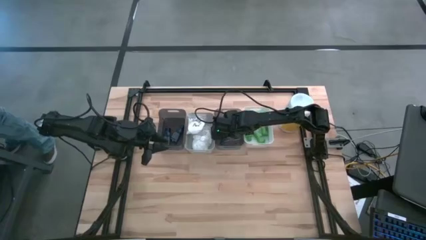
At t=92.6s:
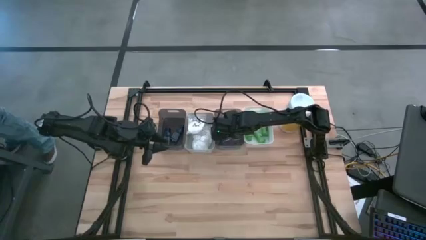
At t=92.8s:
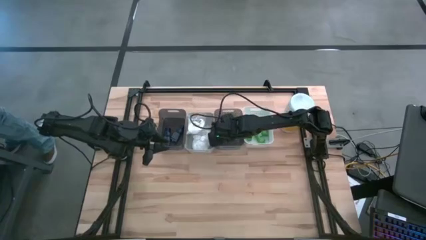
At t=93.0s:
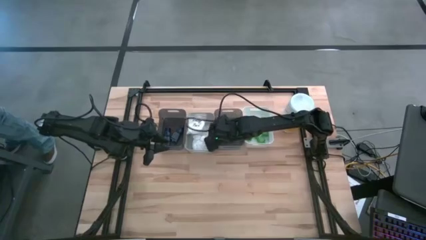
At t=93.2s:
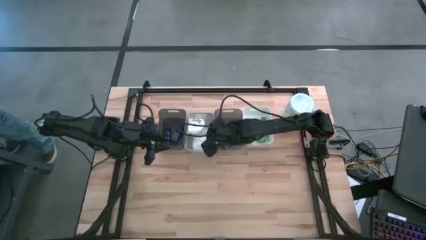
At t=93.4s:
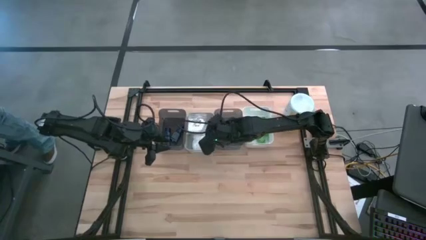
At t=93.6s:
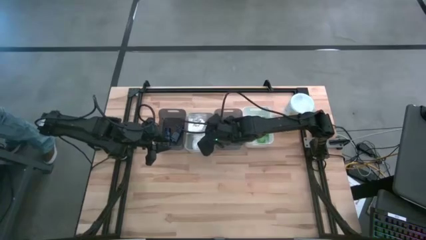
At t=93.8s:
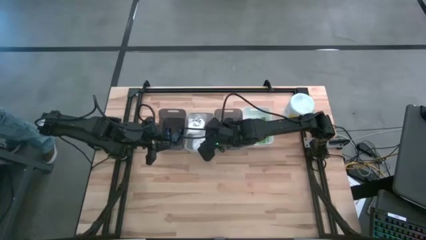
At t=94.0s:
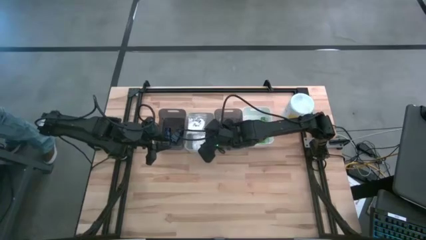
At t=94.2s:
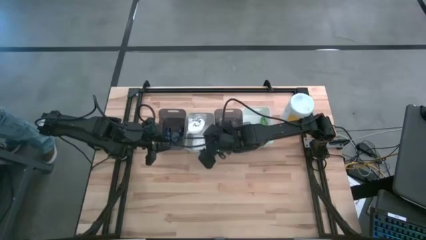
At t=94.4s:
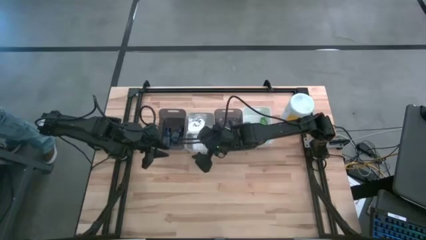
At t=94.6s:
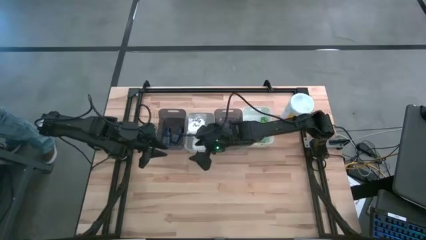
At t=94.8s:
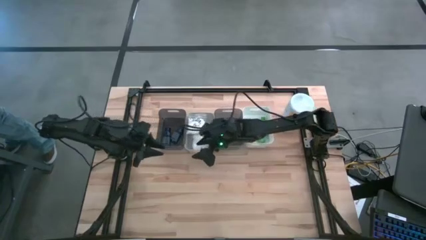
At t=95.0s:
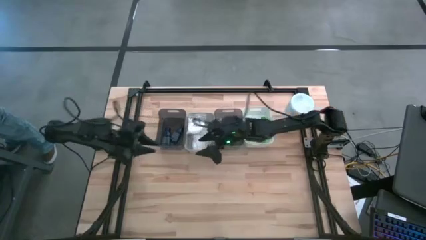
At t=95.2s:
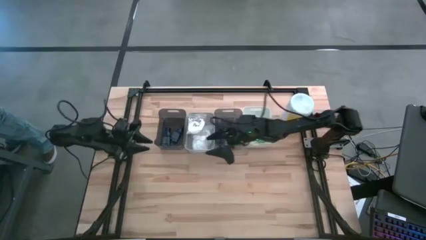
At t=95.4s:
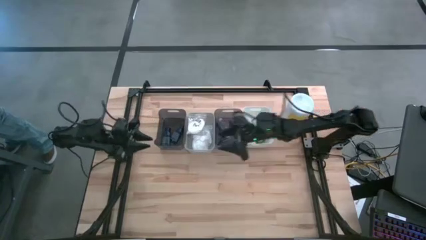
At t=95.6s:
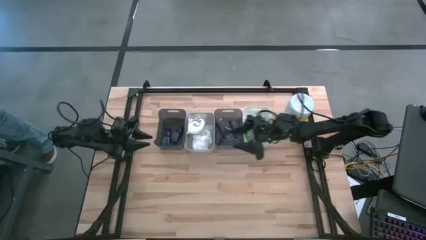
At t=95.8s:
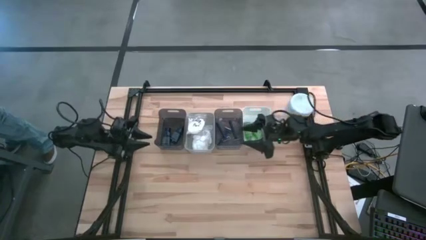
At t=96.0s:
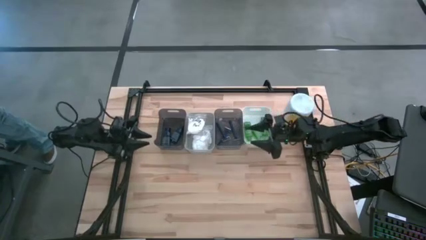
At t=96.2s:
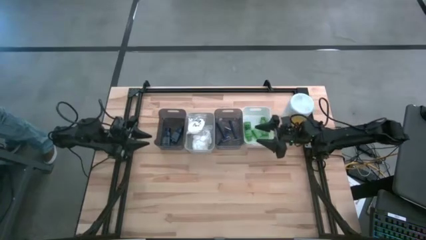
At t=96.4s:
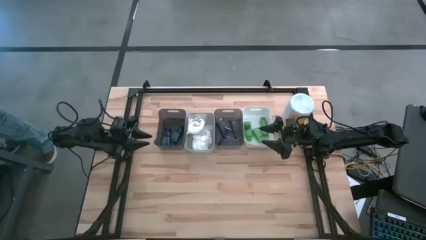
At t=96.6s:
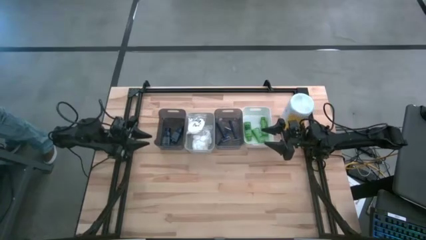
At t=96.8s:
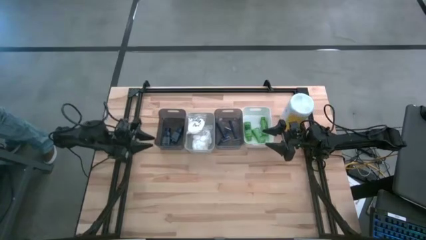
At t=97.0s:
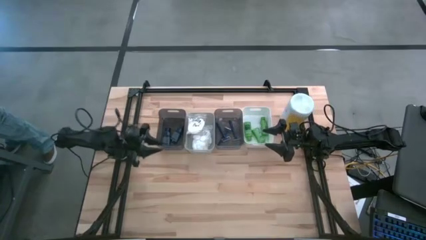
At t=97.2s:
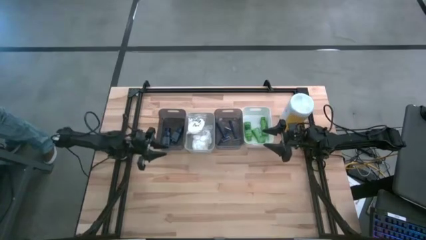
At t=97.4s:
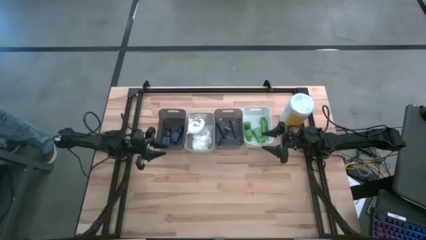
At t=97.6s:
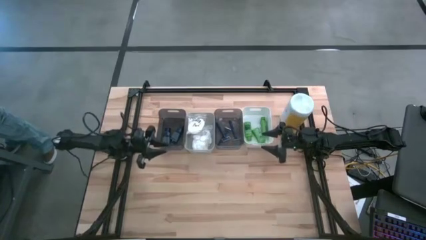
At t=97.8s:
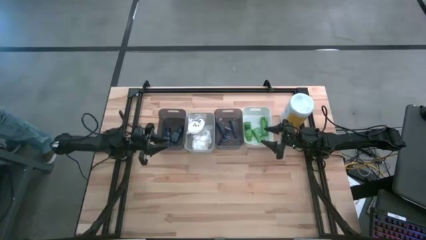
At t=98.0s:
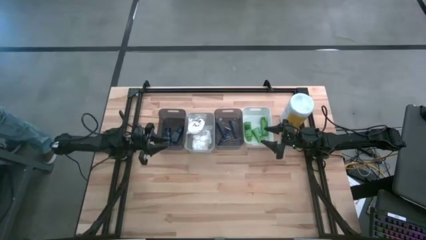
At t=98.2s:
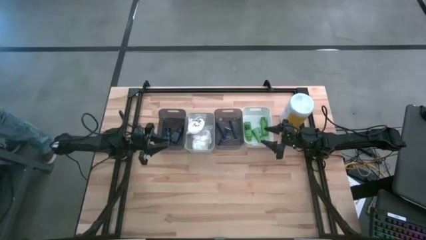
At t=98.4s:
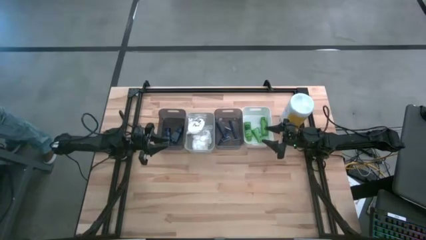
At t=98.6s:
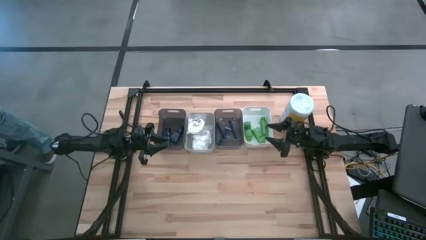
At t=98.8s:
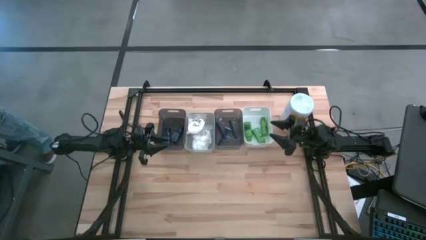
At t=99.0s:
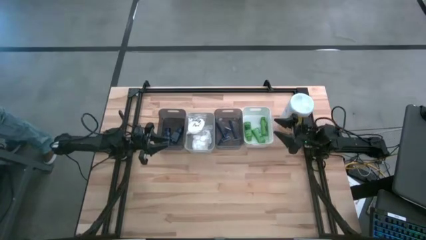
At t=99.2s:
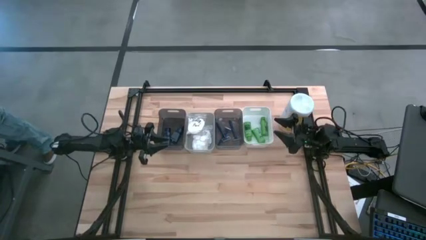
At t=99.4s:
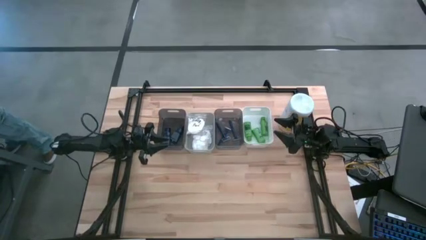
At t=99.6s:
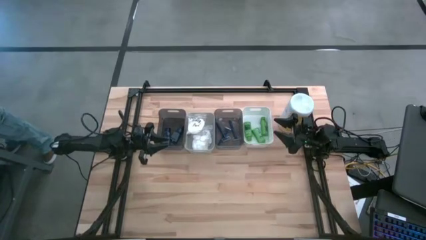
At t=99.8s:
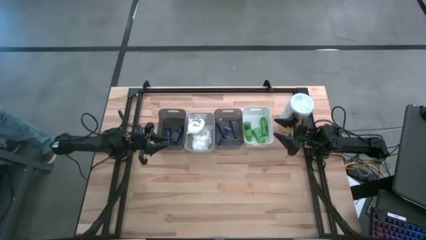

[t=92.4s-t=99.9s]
Task: Pick & Place Travel size toiletries
Return to Home Position

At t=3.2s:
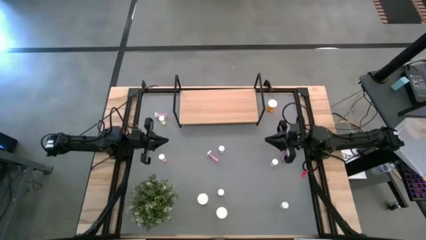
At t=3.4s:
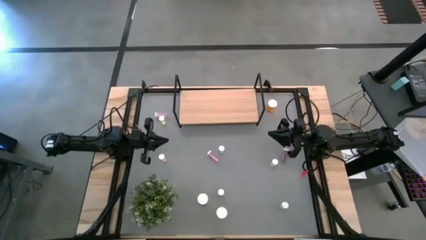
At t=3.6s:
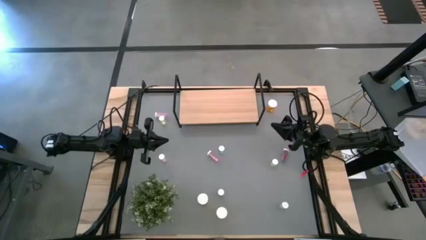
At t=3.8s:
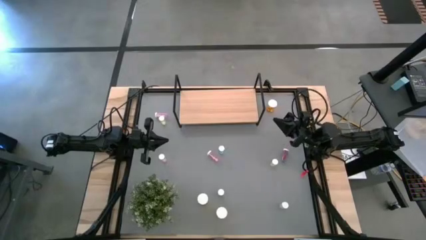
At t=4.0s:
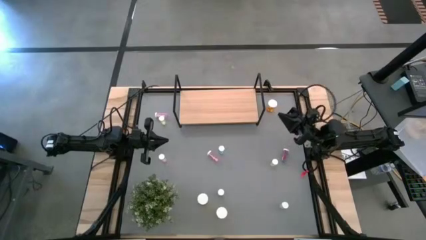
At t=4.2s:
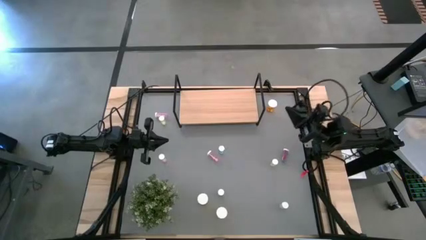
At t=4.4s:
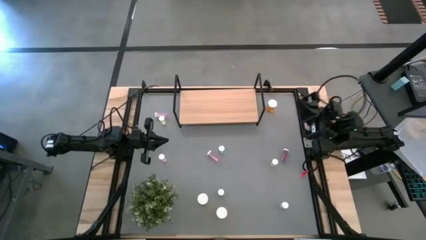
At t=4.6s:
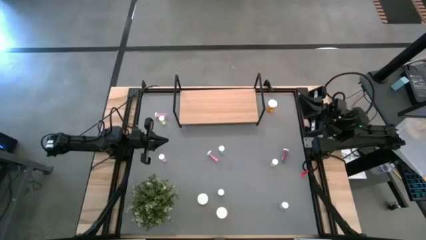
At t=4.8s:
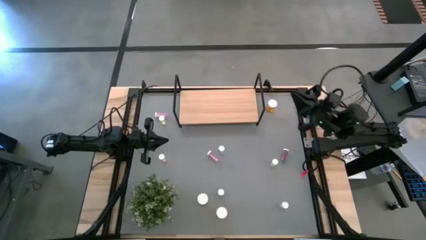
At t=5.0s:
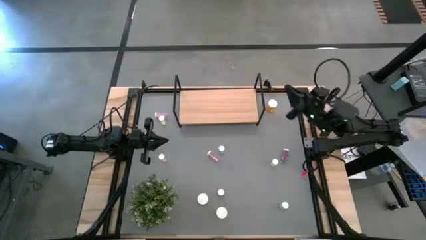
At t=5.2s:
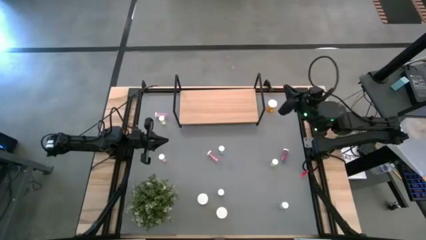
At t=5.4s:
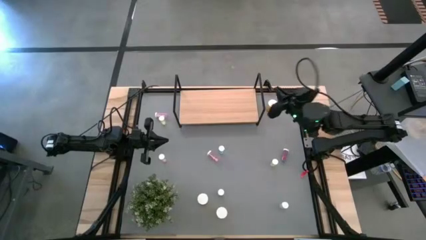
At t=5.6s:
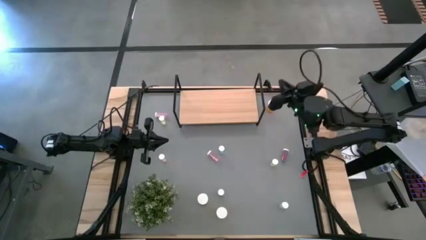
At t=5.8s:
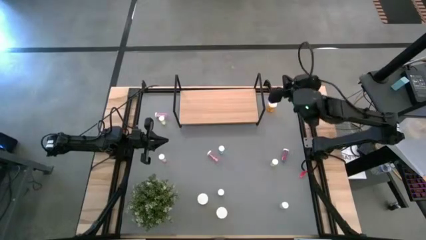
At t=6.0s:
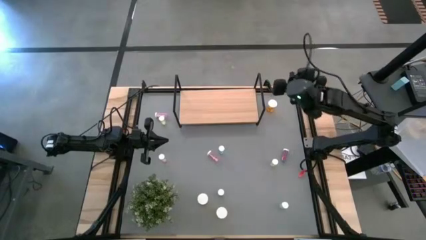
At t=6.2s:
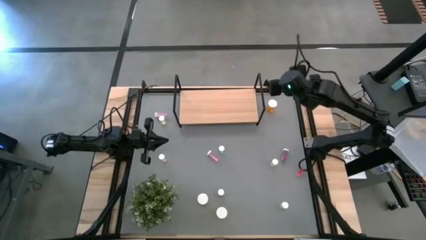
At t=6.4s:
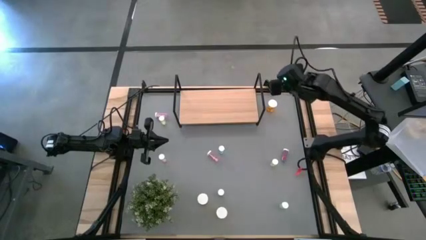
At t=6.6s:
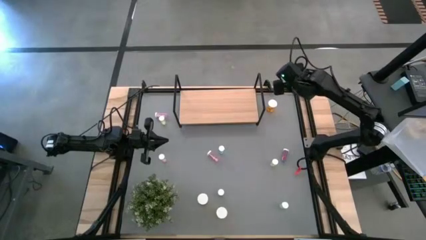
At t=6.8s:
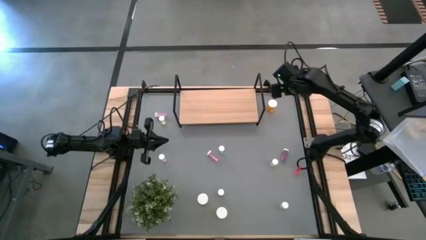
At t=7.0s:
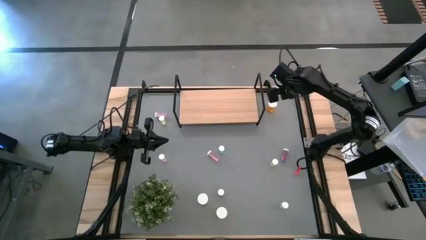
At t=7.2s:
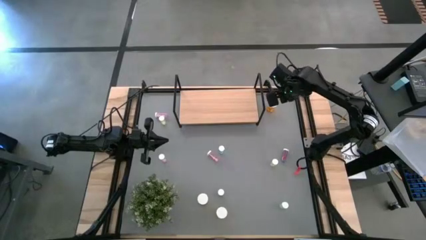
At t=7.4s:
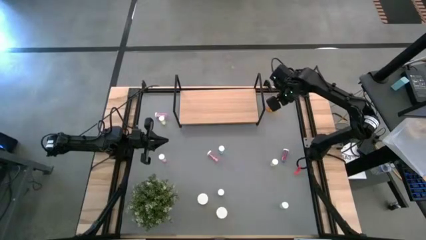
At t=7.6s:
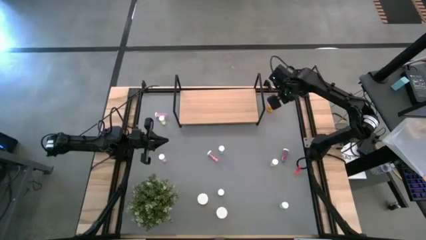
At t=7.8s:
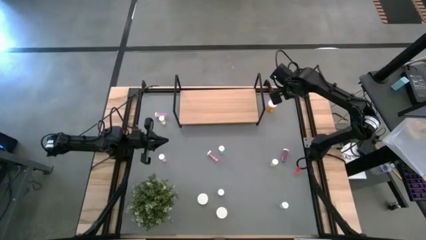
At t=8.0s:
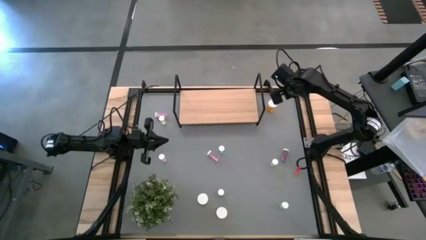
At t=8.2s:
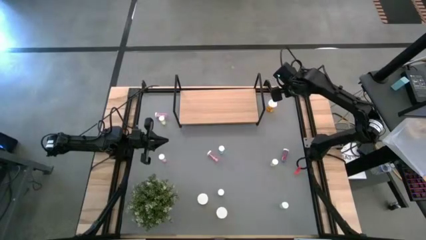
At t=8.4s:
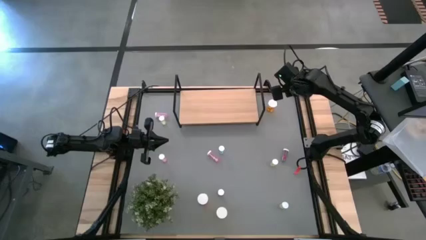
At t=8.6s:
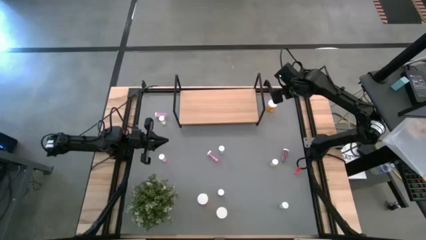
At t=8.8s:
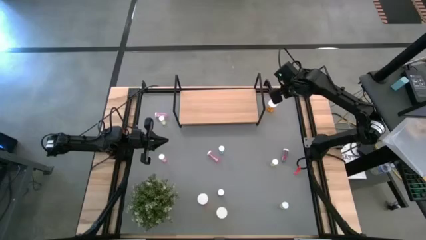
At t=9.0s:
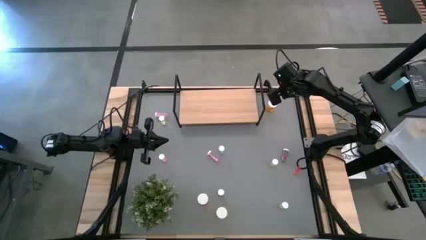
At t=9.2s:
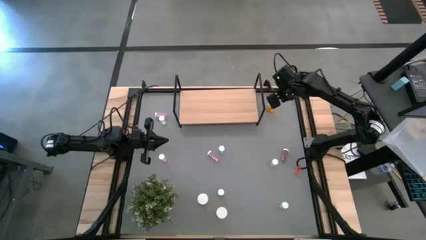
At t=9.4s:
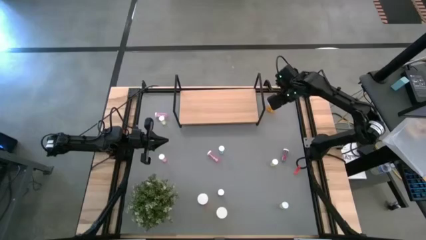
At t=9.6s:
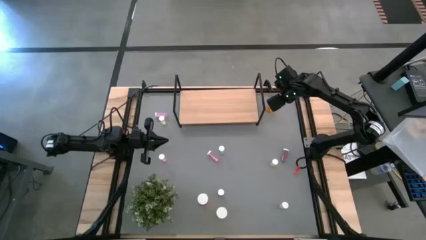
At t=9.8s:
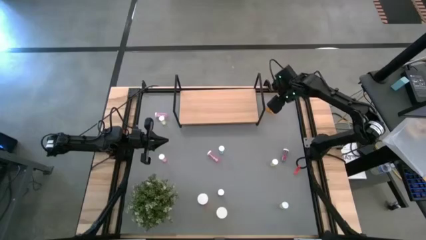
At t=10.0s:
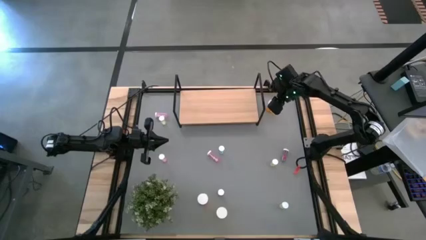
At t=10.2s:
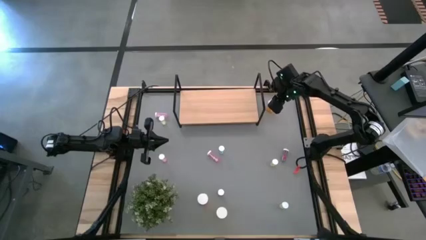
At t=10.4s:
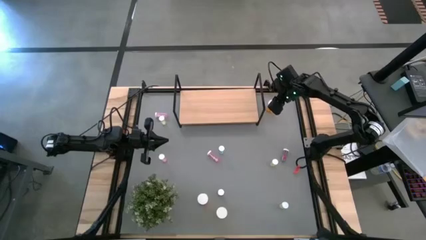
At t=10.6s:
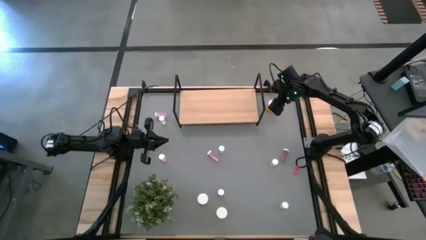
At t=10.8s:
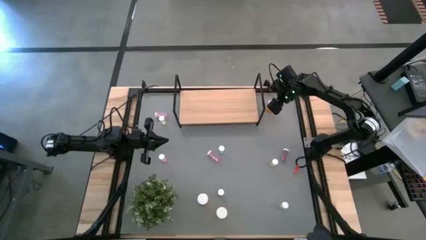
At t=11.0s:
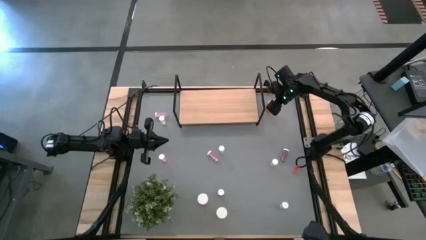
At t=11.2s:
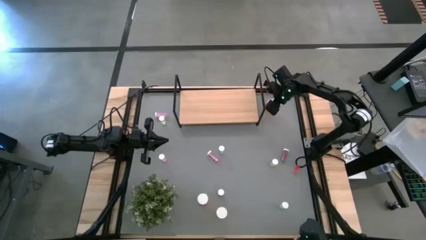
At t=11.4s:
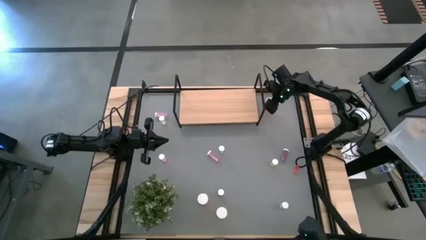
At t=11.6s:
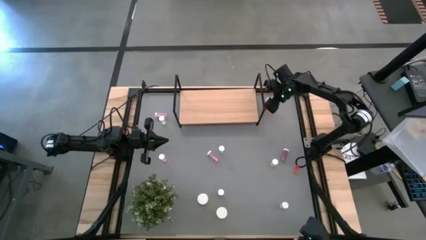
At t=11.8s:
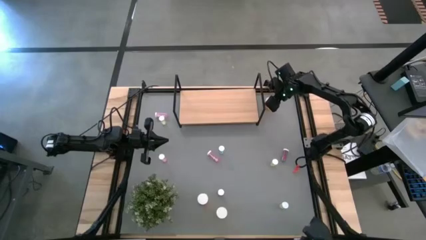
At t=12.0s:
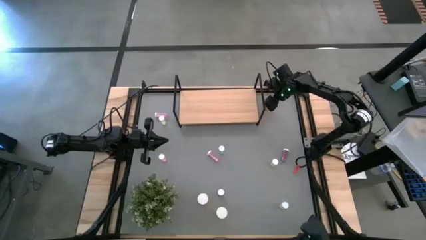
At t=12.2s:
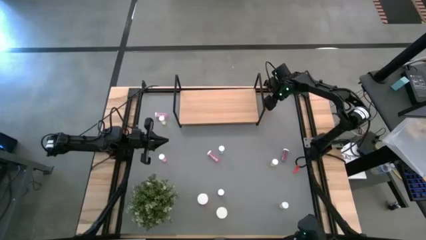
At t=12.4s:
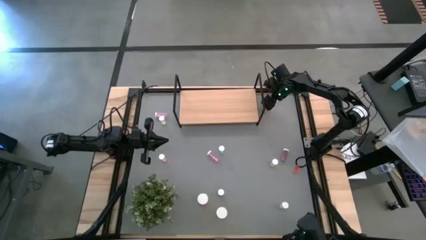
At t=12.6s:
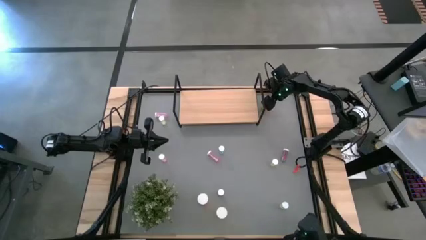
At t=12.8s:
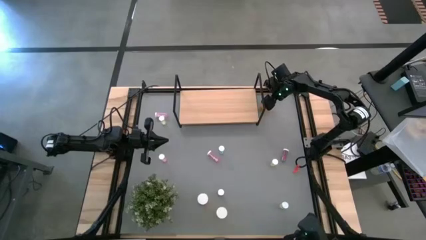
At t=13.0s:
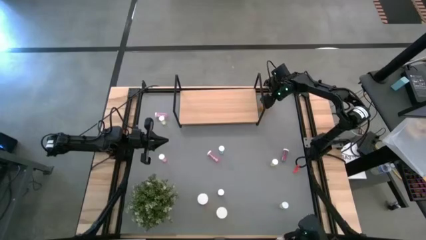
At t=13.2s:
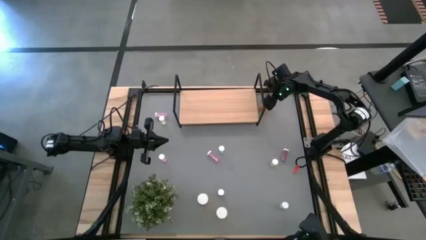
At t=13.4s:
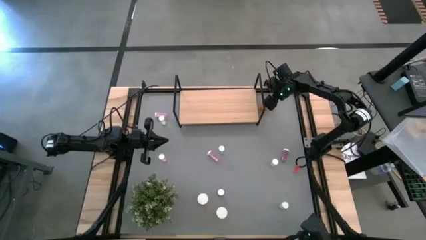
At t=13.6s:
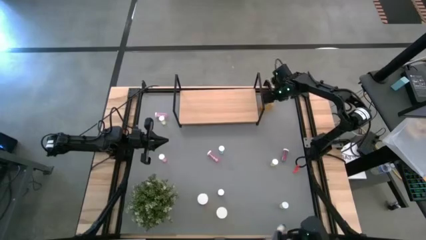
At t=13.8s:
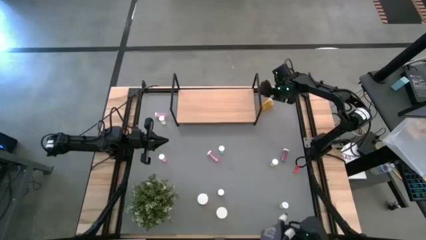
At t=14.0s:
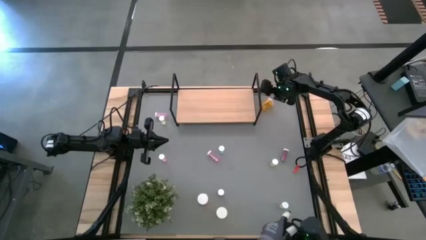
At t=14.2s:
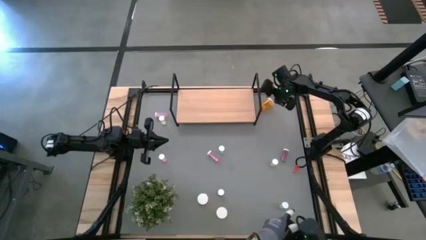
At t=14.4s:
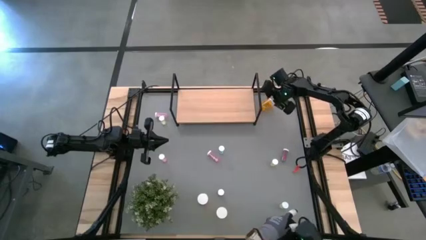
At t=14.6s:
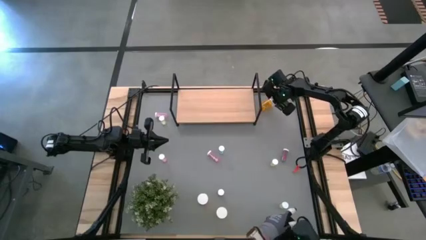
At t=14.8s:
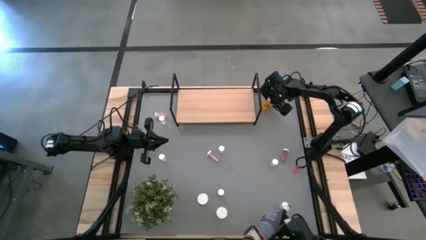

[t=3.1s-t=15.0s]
Task: Pick and place medicine bottles onto shelf by color
Put the top right orange pill bottle on the shelf
